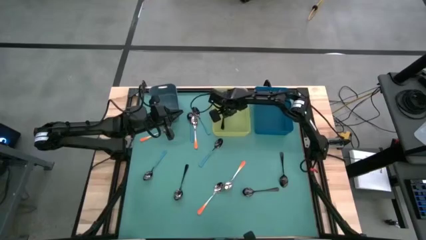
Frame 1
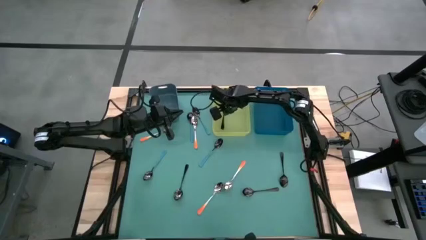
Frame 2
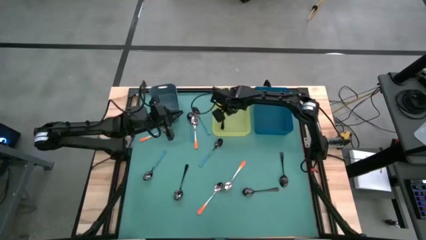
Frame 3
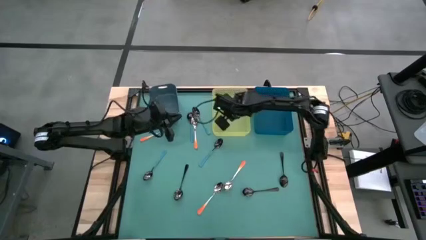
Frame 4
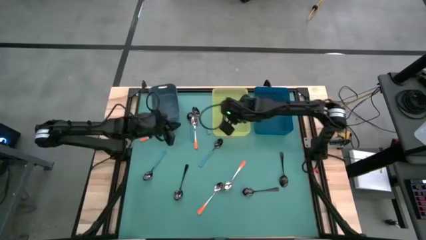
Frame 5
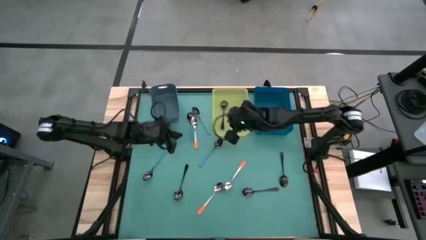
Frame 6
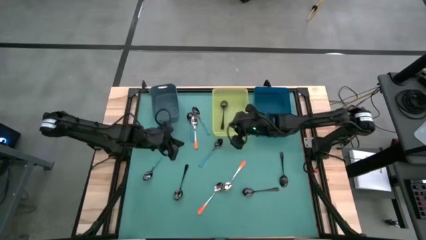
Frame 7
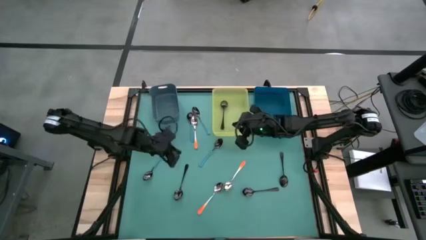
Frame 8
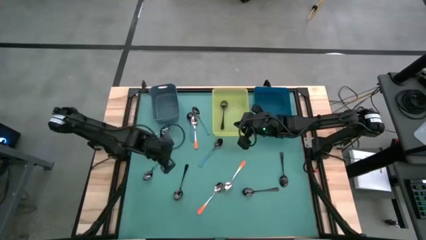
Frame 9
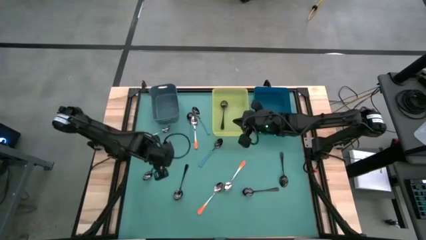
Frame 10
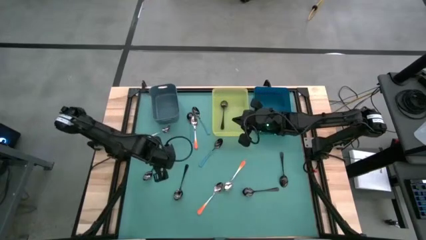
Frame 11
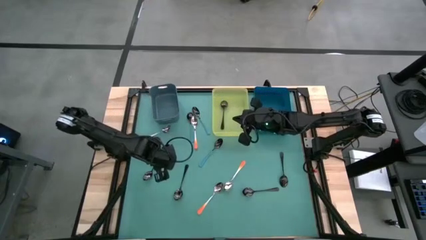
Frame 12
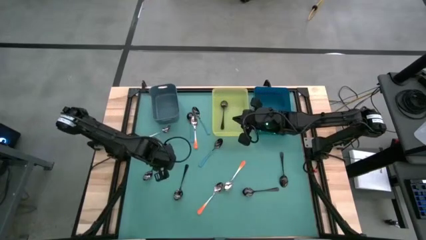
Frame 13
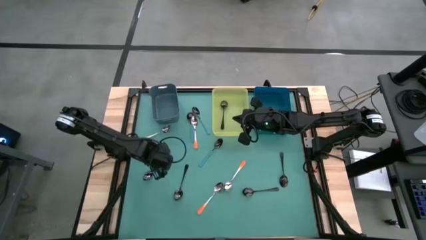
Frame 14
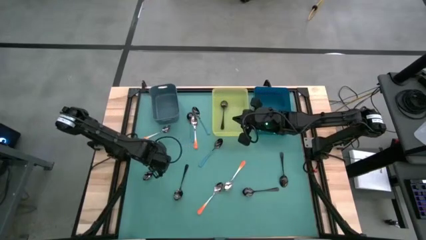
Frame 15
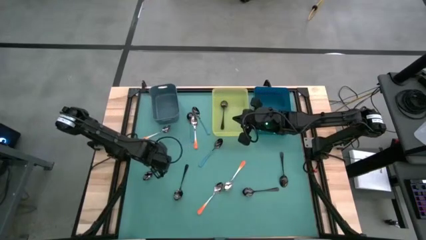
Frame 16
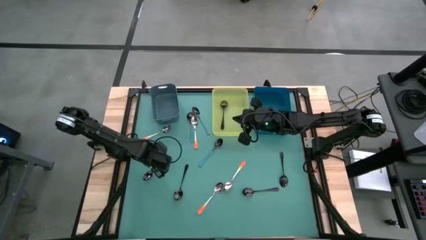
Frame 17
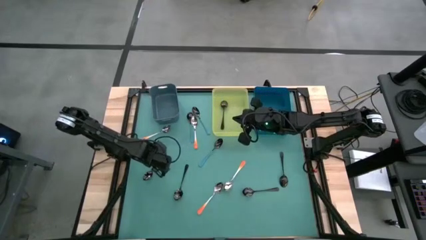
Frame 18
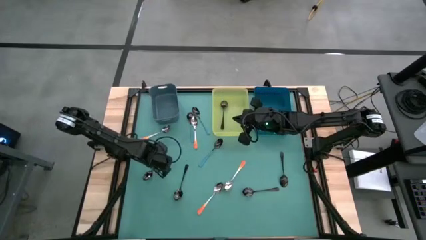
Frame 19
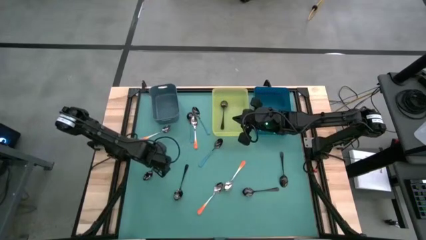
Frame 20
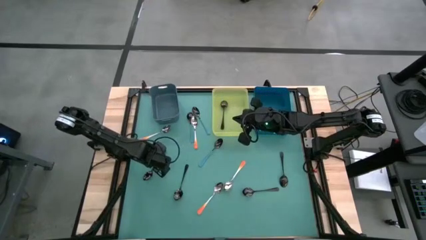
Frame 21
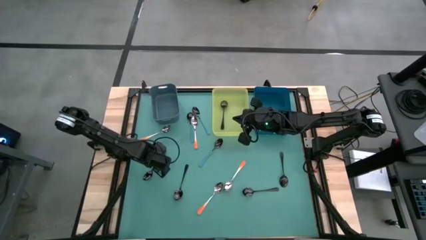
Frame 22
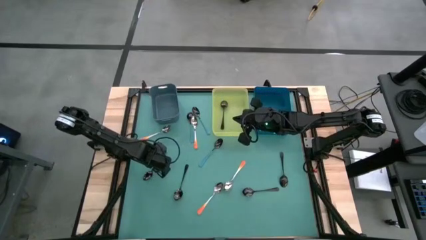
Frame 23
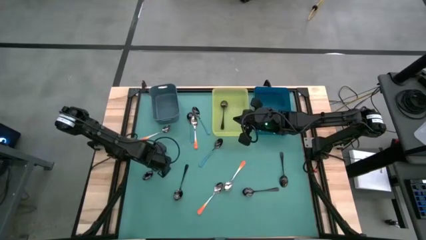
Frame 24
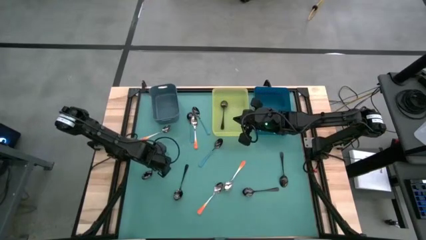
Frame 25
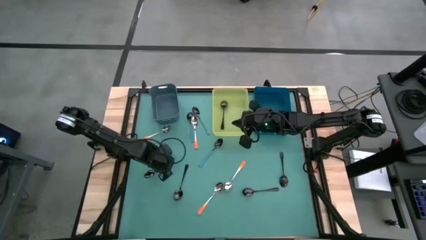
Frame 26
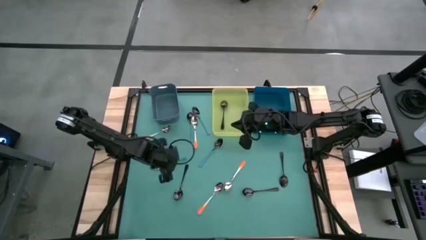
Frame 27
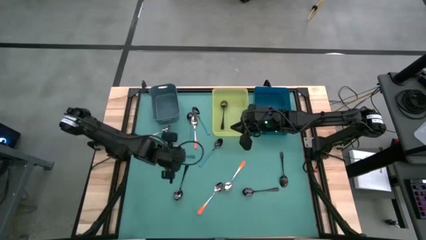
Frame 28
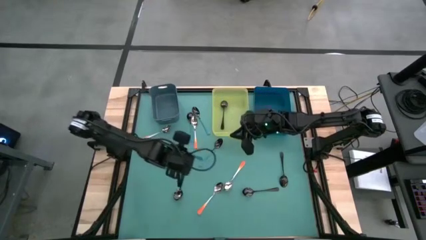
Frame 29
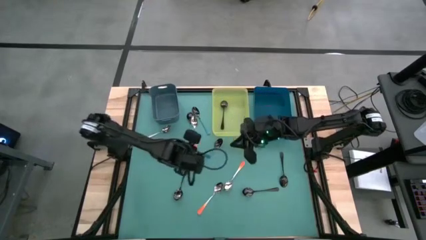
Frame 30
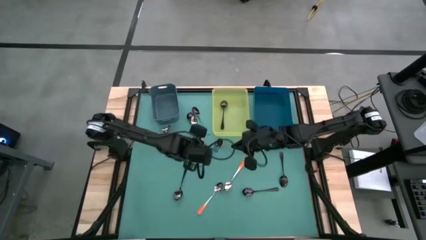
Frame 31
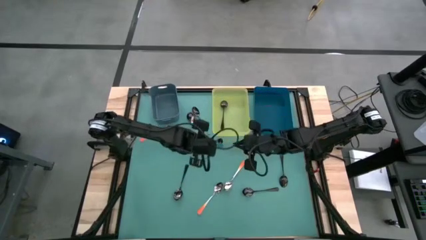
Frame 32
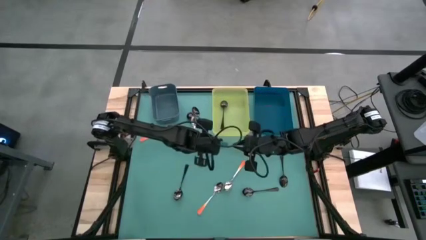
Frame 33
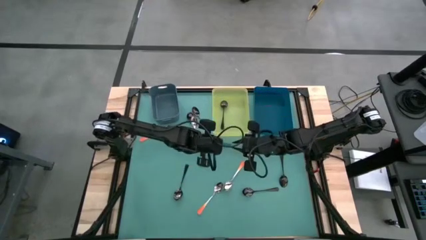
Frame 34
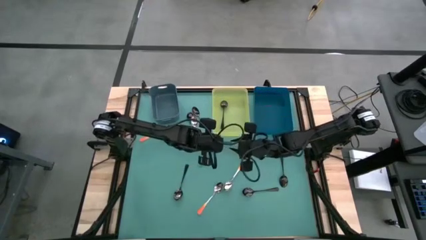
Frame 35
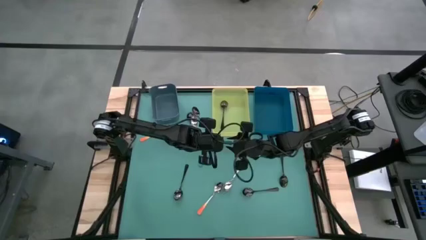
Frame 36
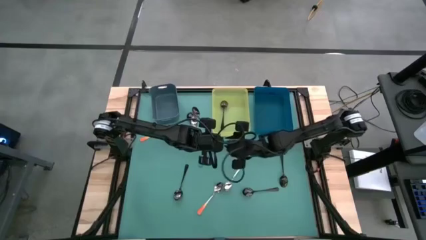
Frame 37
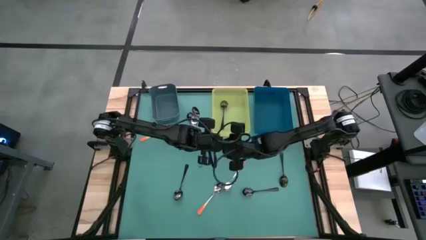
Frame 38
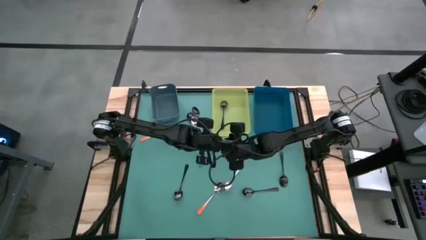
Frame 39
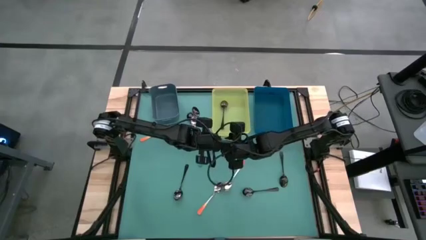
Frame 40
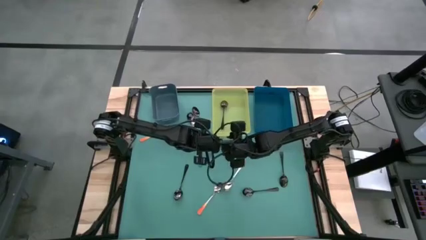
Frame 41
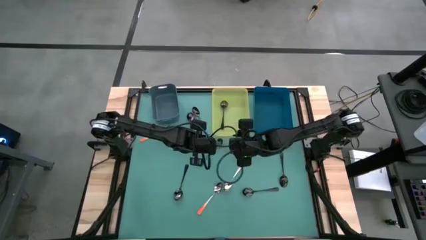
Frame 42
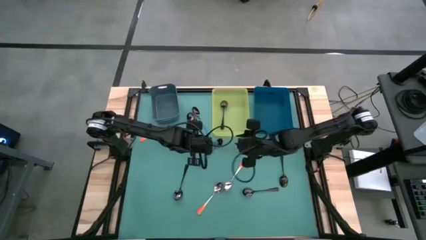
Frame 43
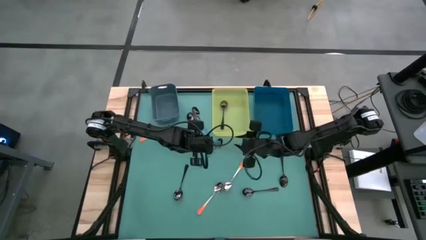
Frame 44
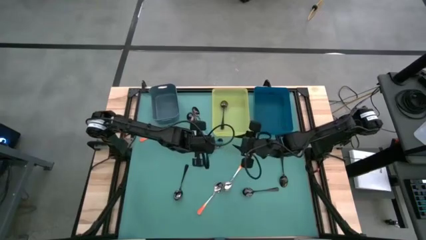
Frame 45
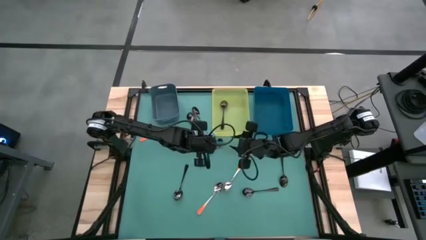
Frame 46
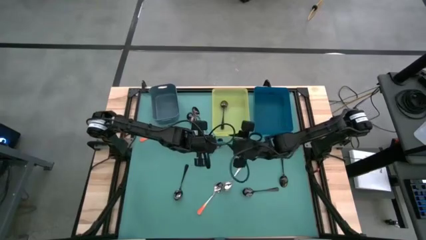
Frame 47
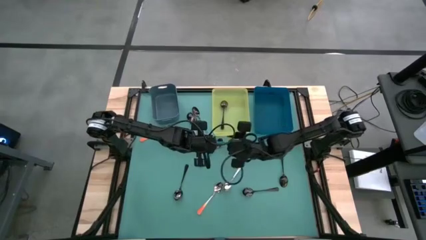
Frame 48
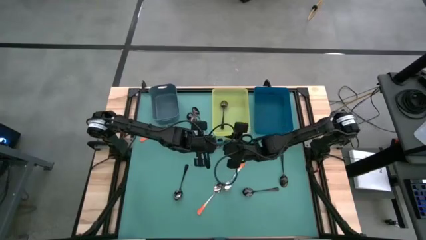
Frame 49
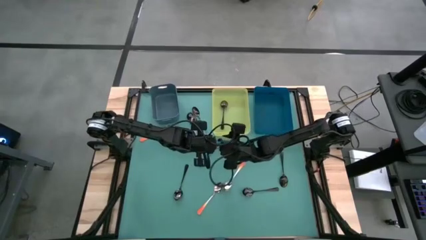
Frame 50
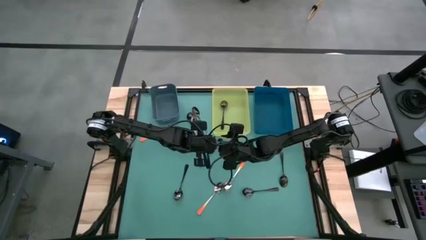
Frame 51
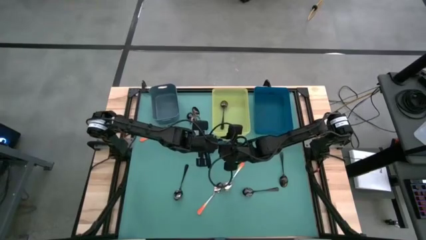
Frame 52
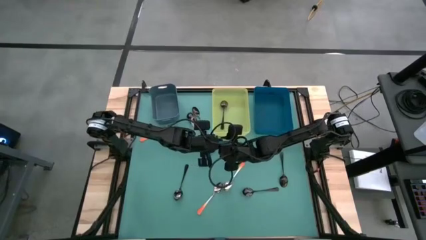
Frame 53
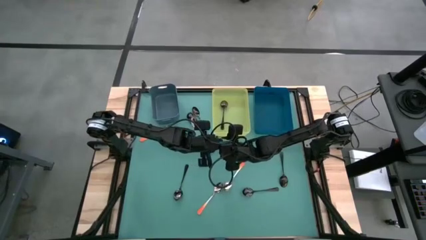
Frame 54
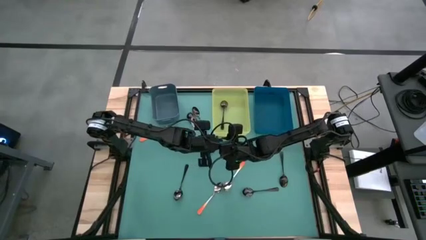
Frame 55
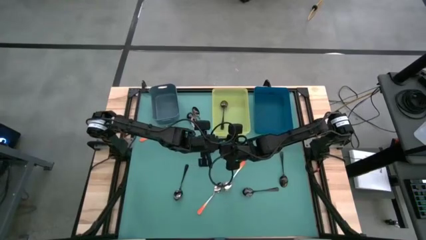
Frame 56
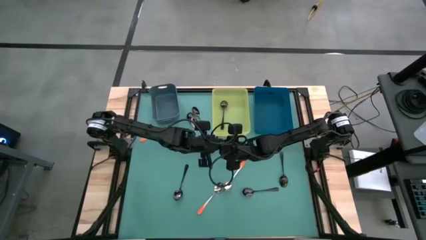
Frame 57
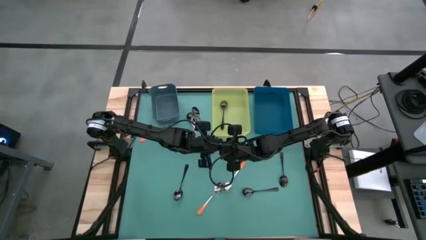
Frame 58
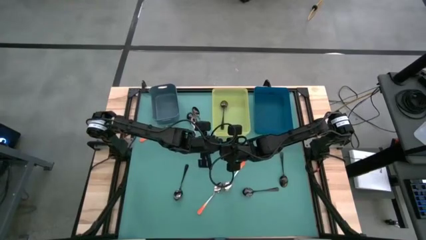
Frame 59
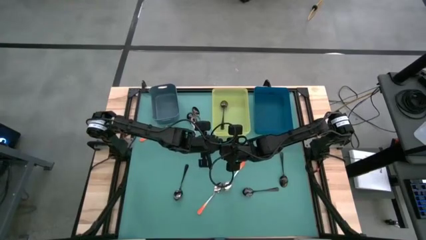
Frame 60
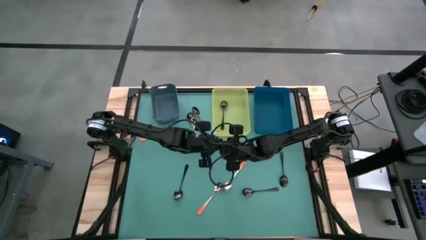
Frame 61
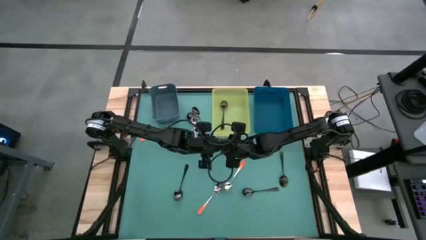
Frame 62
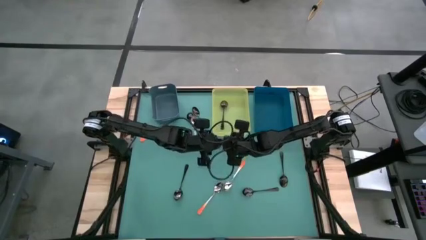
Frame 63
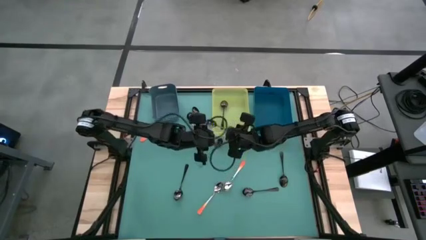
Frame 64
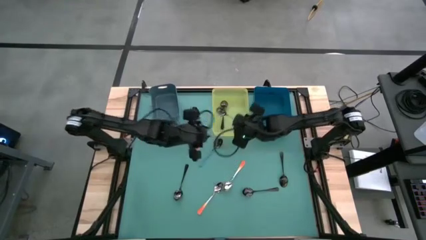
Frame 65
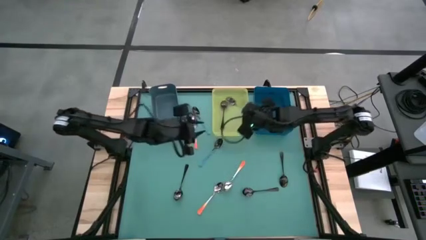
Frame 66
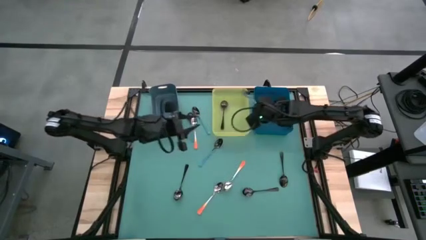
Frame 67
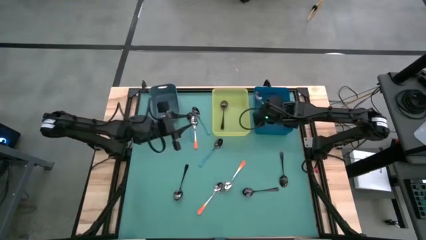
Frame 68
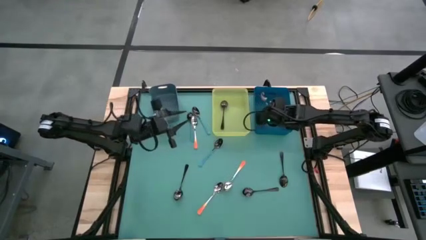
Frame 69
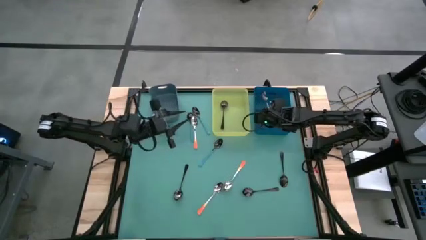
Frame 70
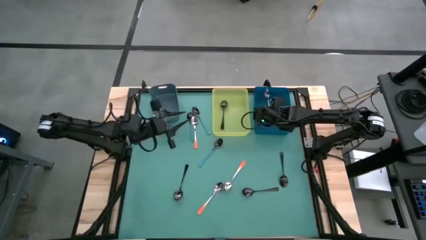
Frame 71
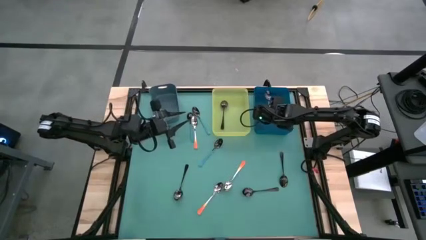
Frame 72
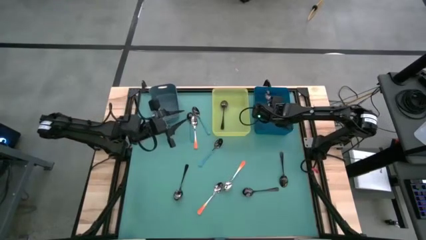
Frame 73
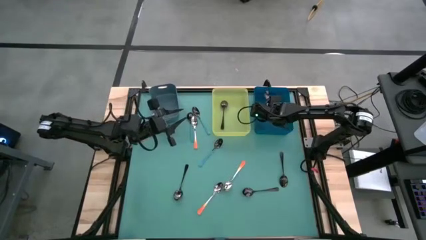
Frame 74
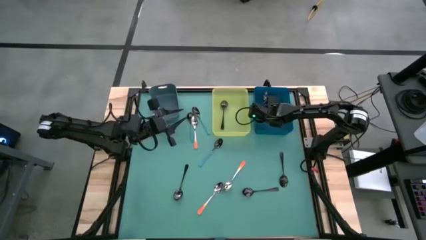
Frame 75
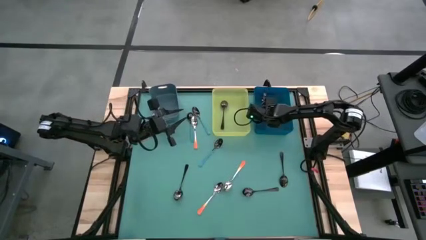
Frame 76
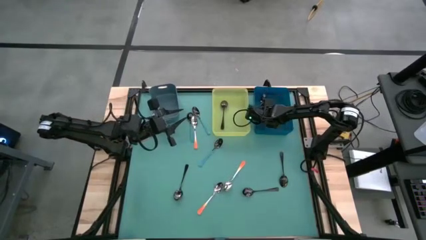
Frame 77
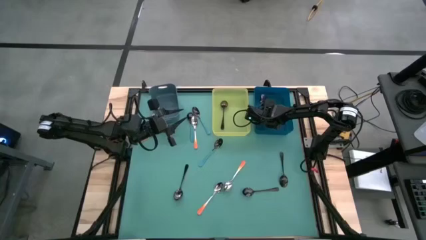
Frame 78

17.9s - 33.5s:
Task: Sort silverware by color (type)
Put the blue spoon into the blue bin
